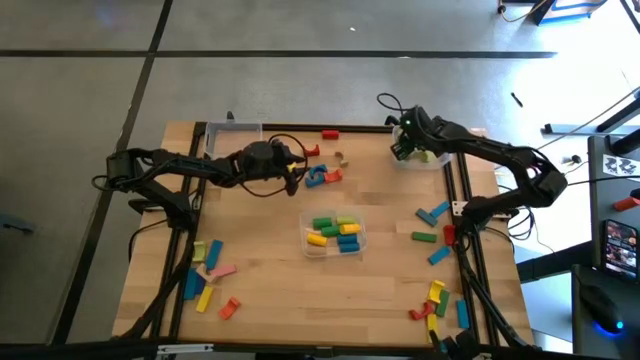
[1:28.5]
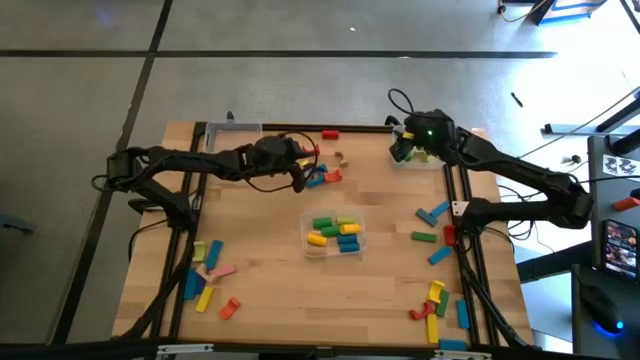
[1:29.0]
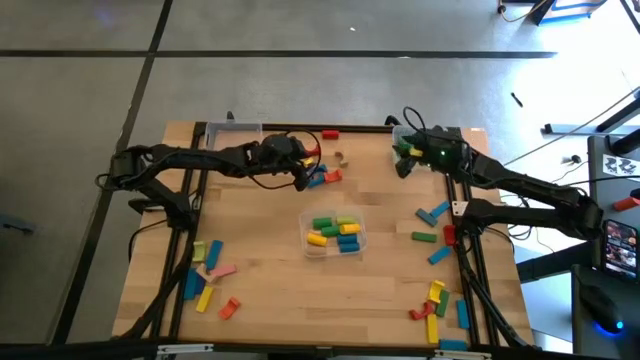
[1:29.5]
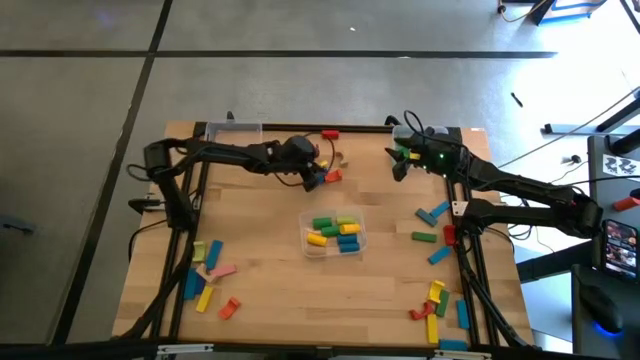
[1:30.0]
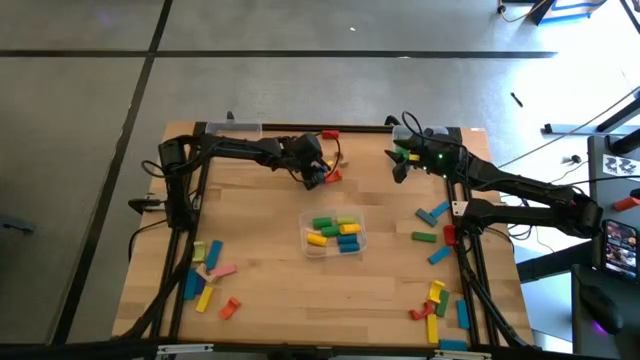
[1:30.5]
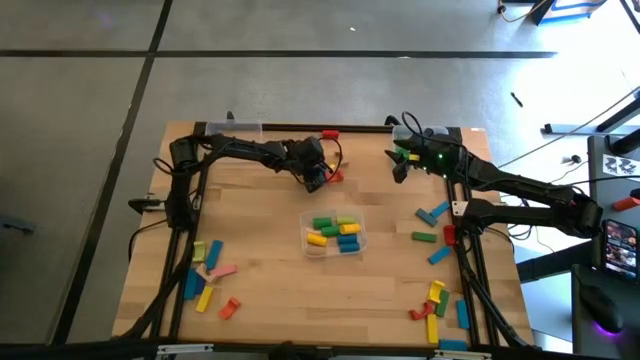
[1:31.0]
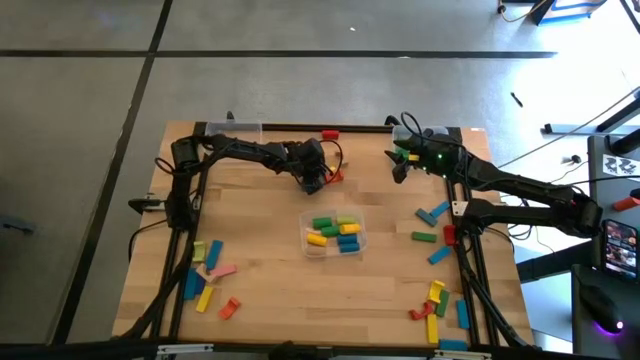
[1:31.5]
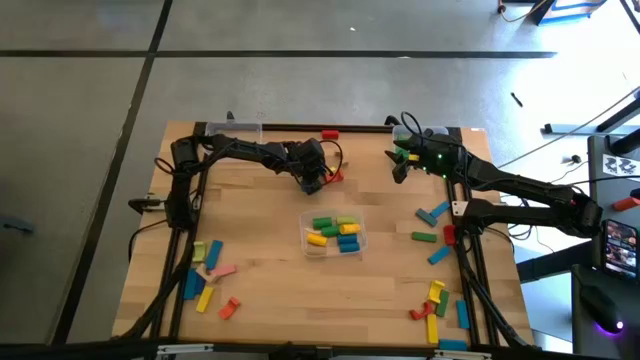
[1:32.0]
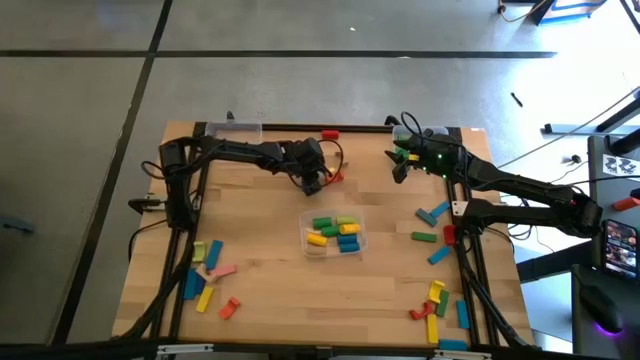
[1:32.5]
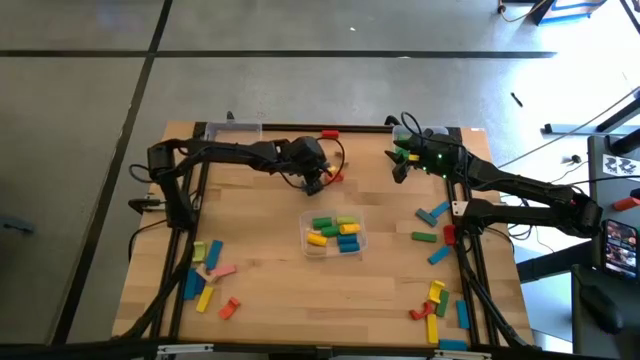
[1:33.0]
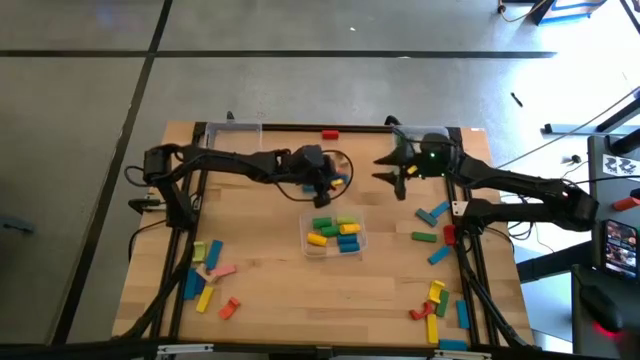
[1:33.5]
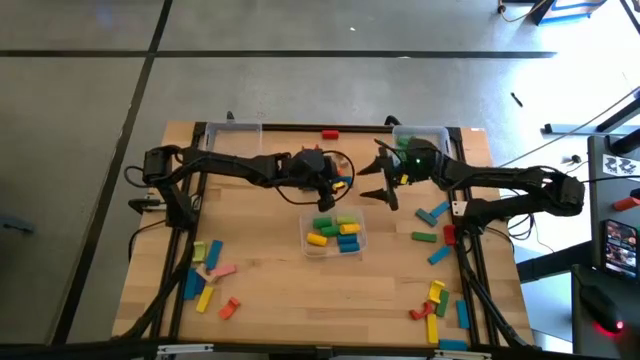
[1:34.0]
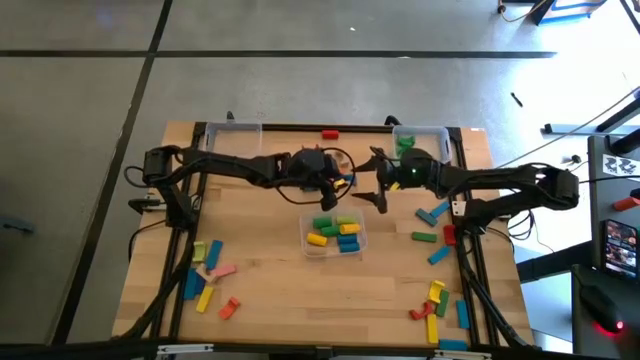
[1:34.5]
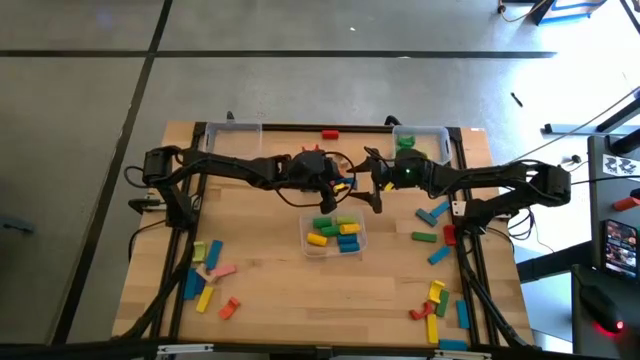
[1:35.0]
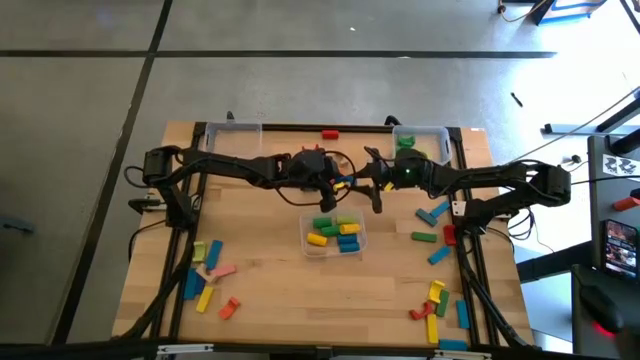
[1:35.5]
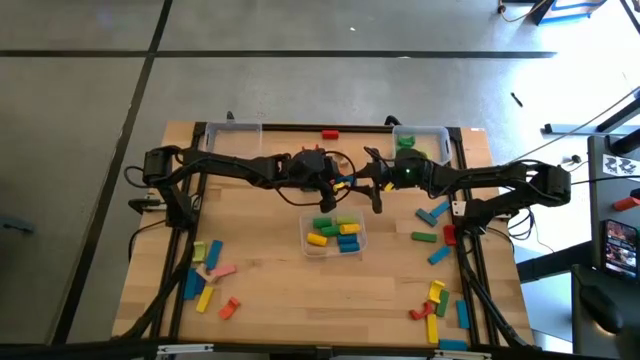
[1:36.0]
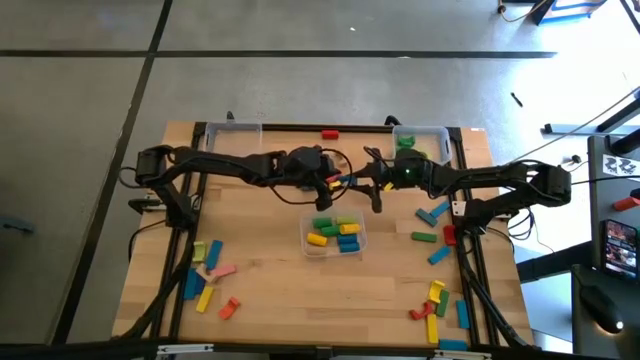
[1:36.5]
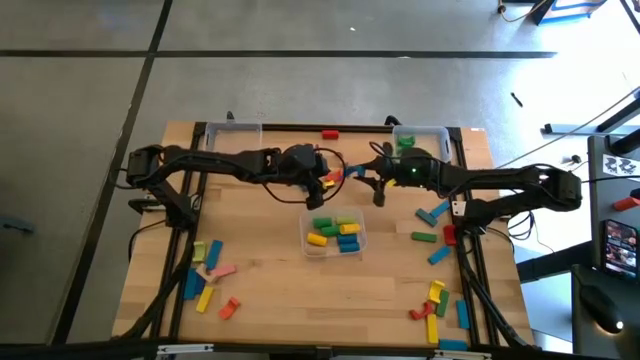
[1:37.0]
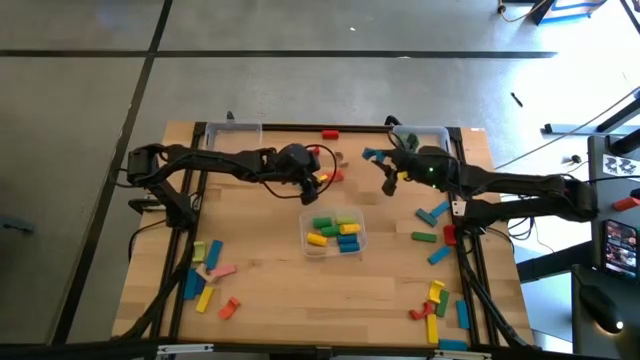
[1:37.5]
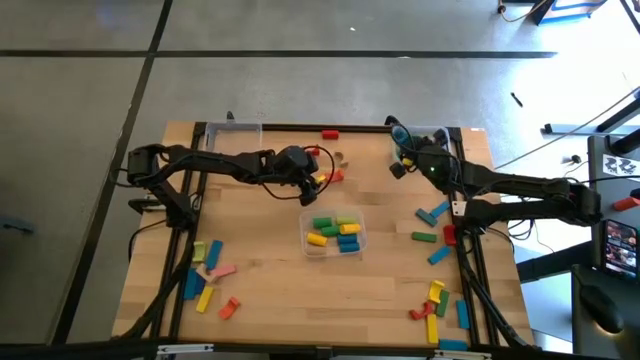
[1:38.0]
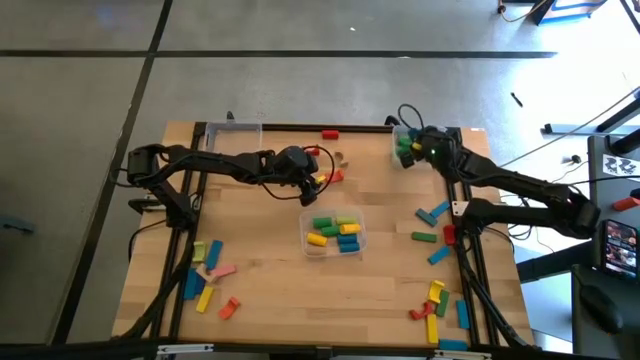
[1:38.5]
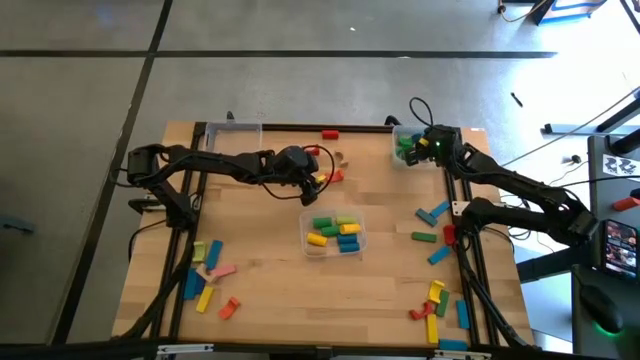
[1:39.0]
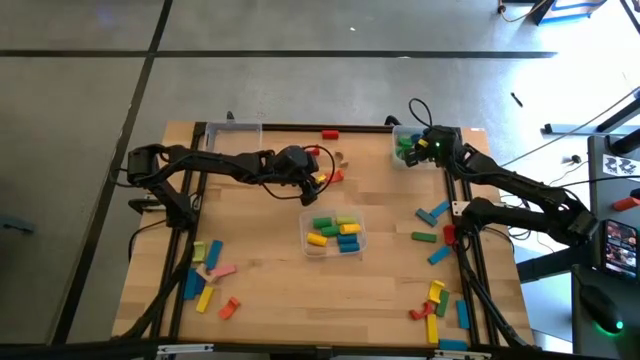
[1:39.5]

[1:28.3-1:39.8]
Task: Sort blocks by size
Put the blue arch block into the top right transparent bin

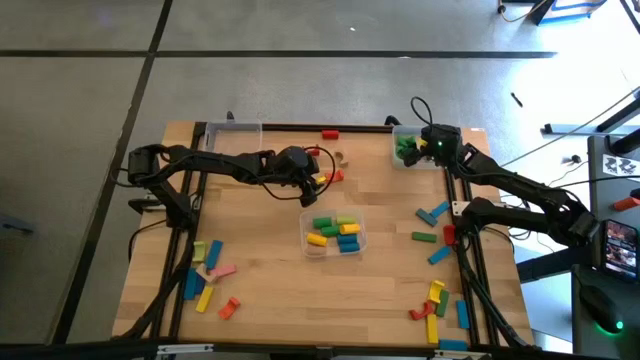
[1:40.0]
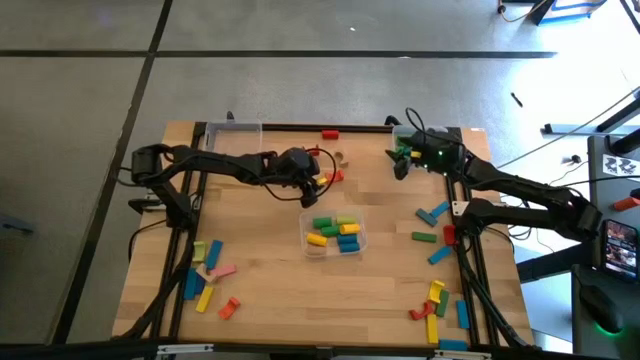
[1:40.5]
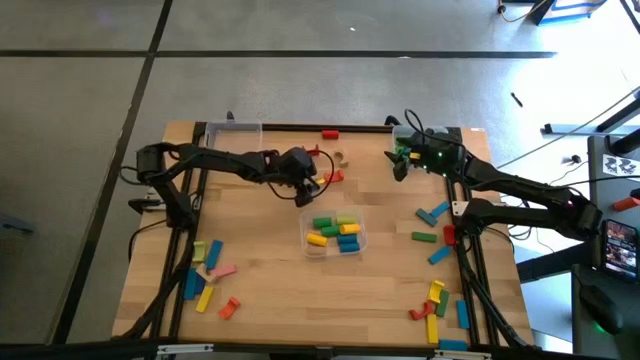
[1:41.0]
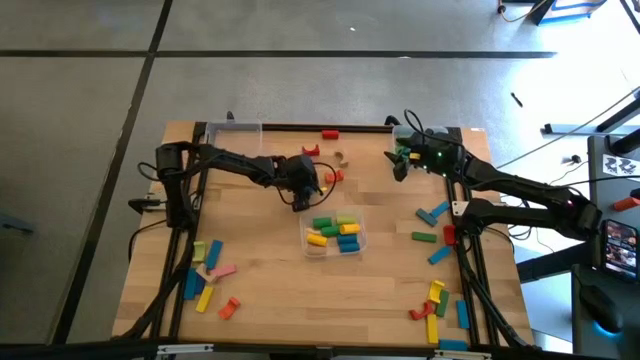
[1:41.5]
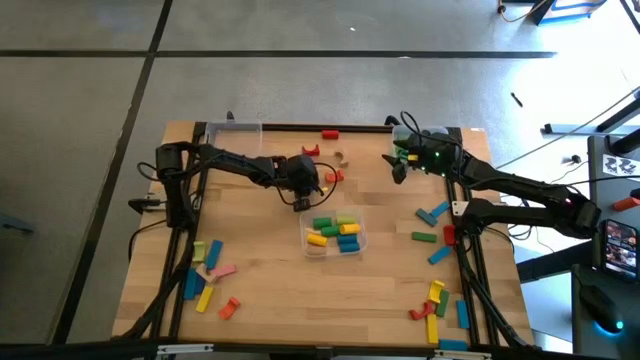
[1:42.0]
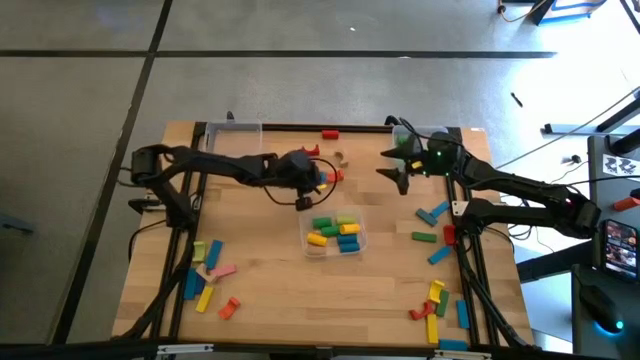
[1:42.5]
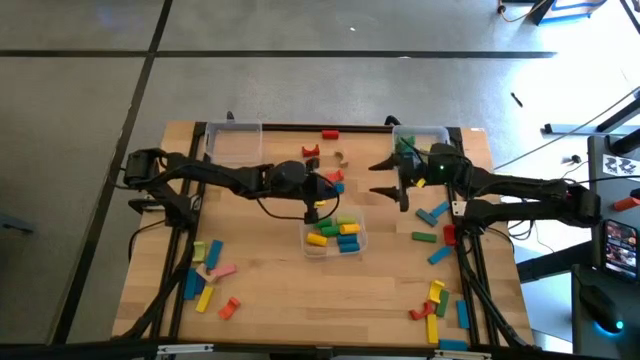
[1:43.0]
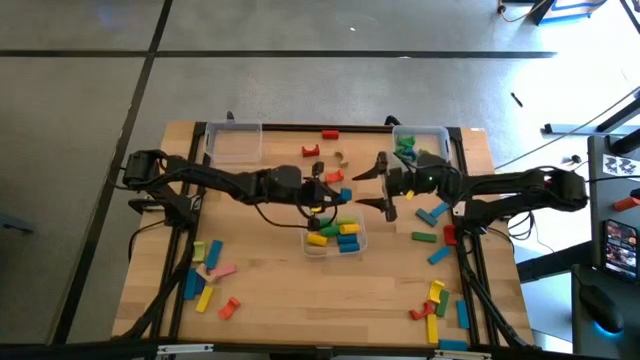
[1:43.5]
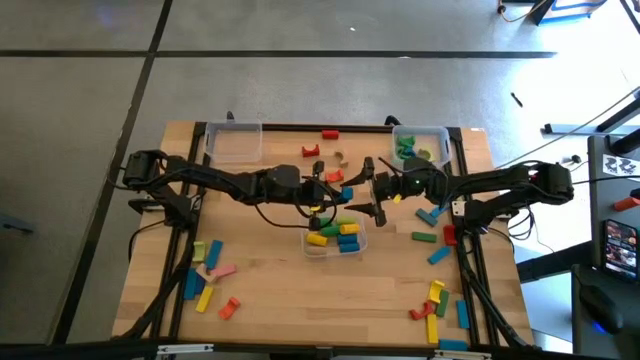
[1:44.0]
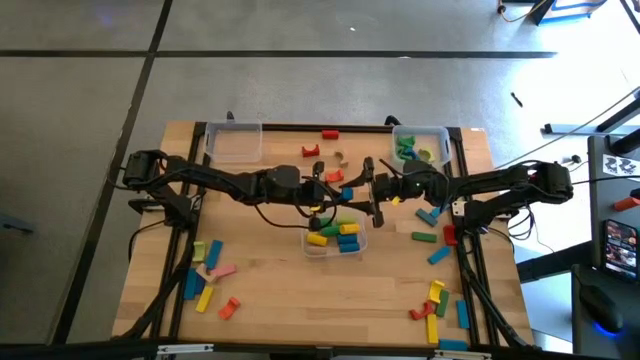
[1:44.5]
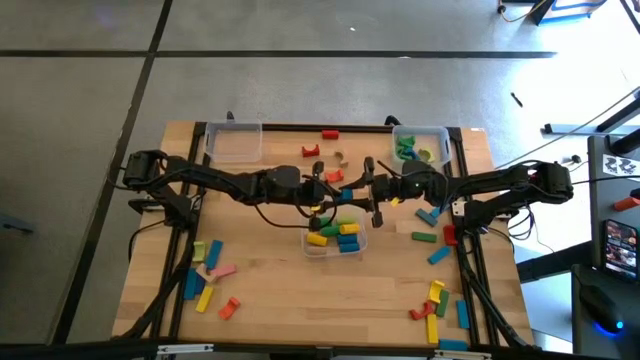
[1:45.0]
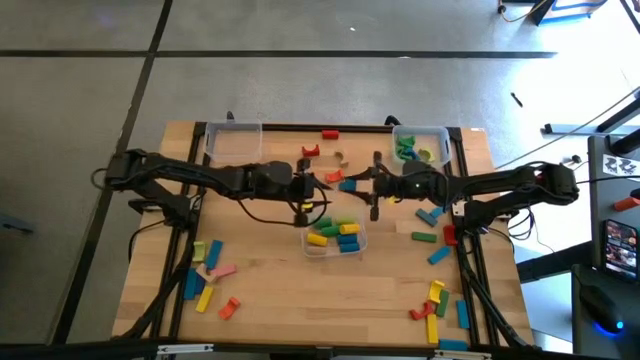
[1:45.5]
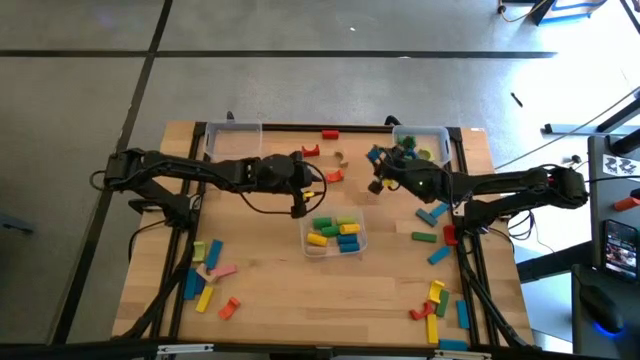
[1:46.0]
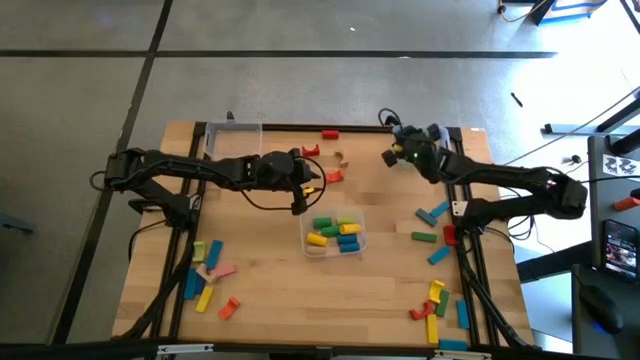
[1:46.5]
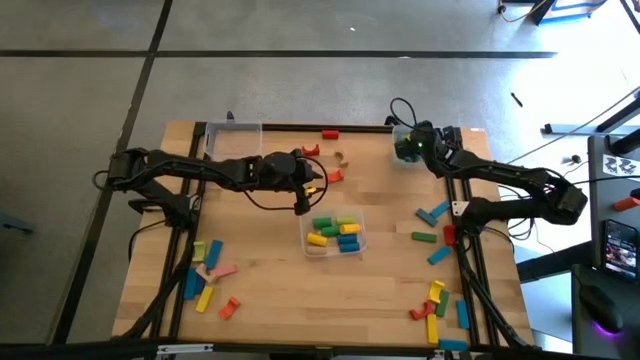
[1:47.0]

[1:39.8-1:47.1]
Put the blue arch block into the top right transparent bin

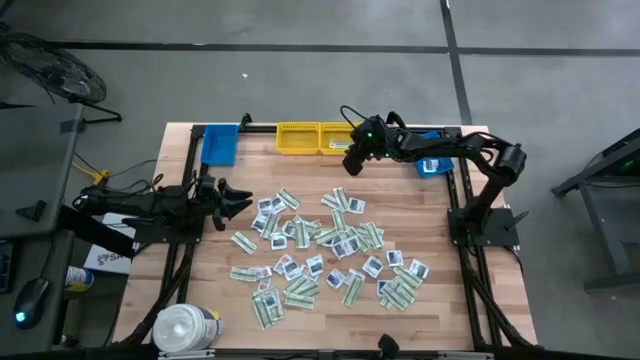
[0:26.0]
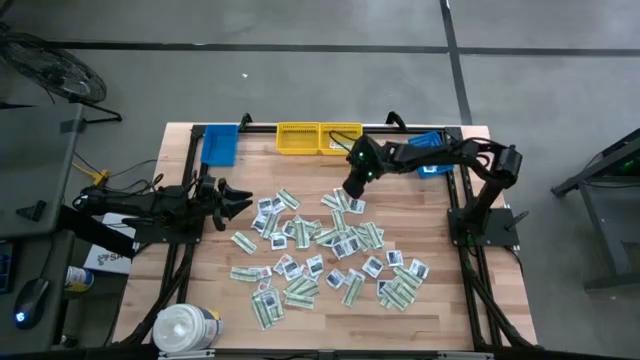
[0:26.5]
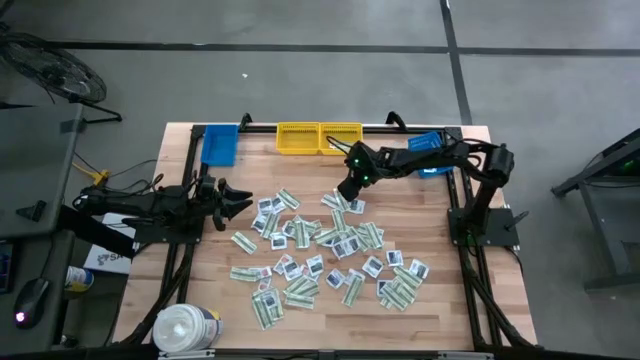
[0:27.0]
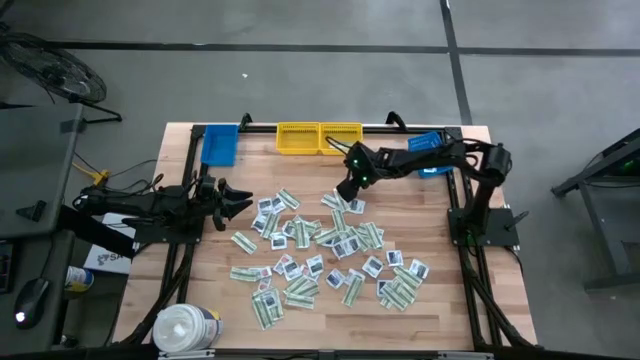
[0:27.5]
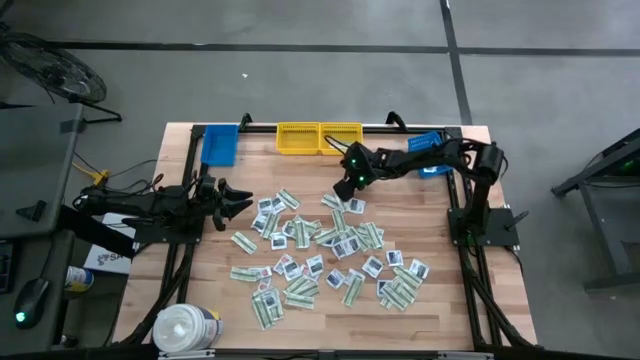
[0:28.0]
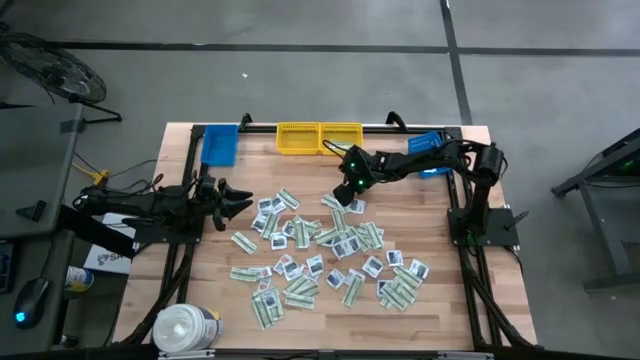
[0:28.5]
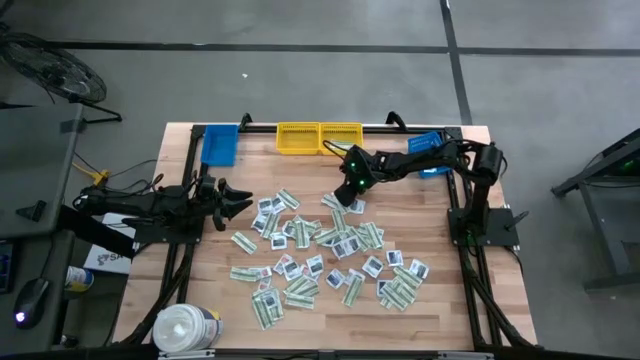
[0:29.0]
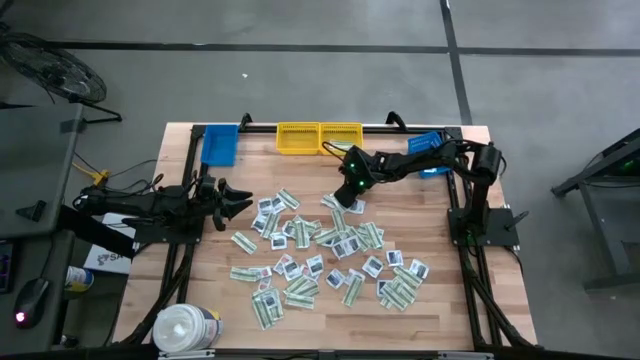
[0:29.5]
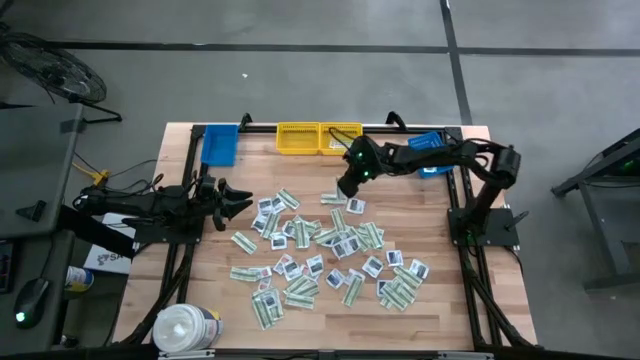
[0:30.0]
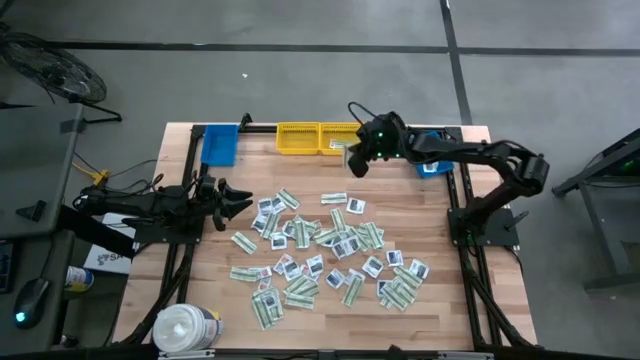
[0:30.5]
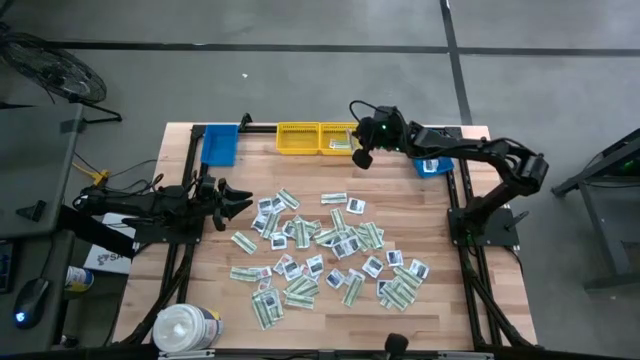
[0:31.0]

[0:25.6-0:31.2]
Task: Pick & Place First Aid Supplies
Put the green bandage pack into the right yellow bin
